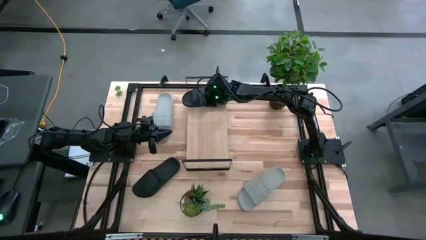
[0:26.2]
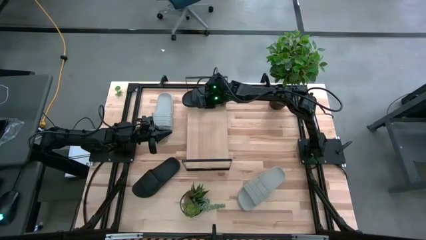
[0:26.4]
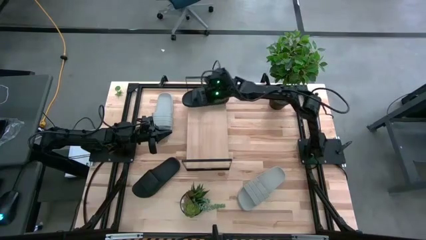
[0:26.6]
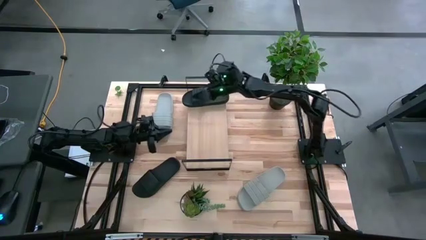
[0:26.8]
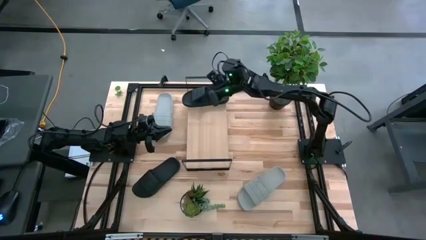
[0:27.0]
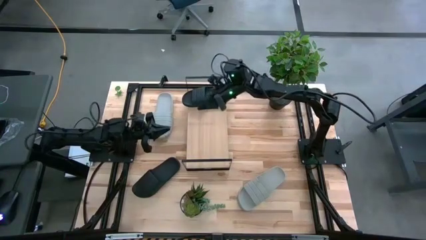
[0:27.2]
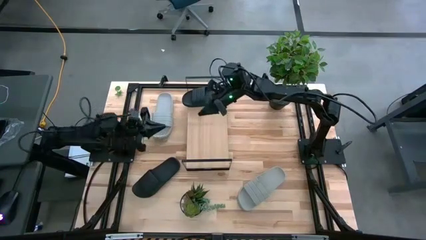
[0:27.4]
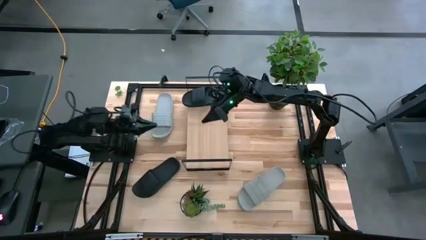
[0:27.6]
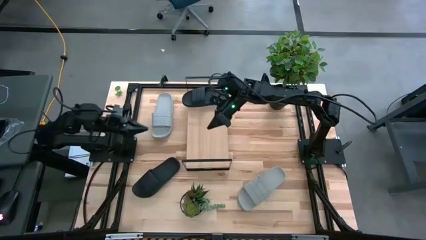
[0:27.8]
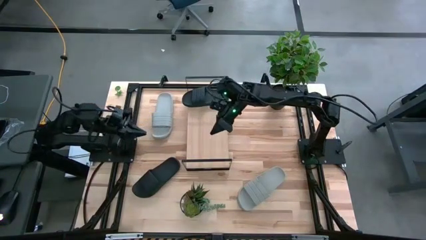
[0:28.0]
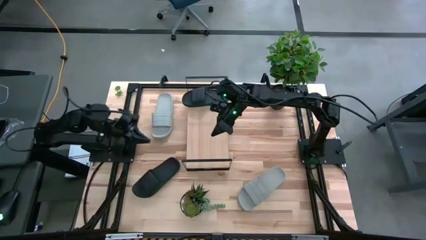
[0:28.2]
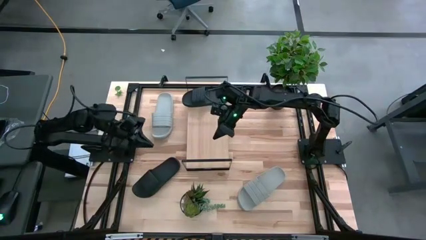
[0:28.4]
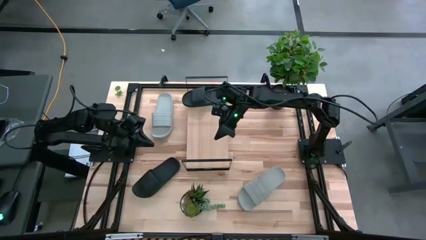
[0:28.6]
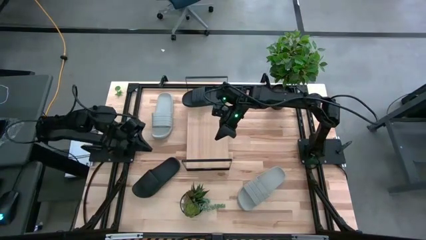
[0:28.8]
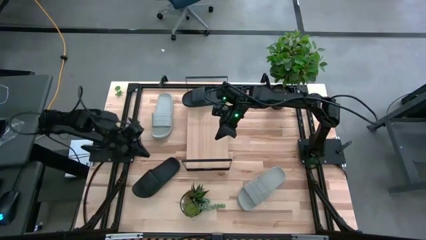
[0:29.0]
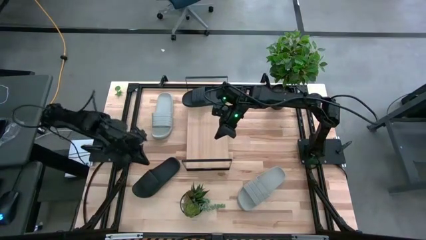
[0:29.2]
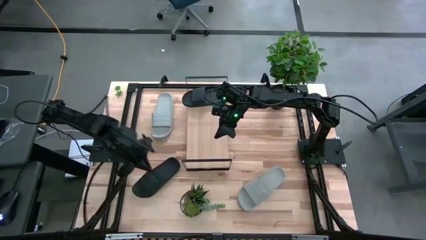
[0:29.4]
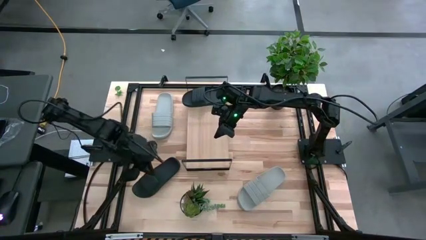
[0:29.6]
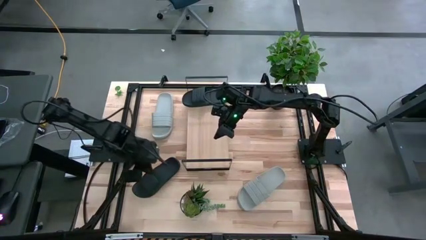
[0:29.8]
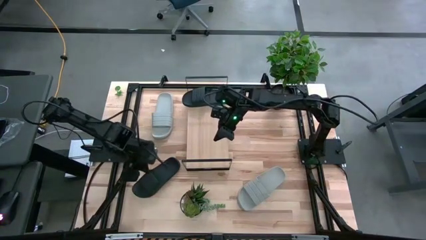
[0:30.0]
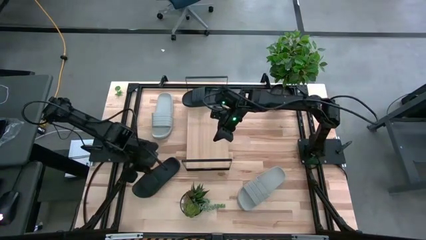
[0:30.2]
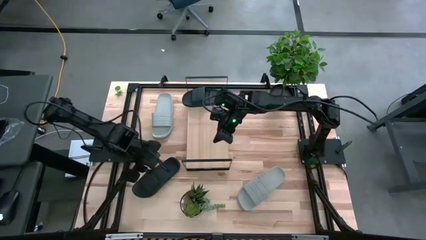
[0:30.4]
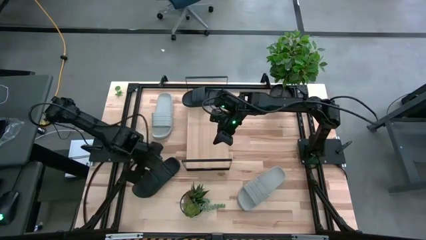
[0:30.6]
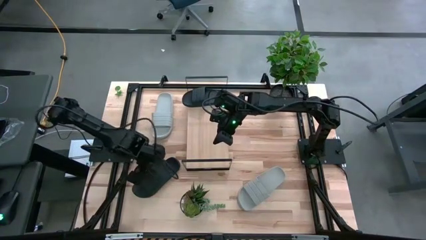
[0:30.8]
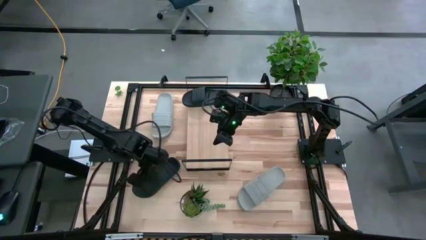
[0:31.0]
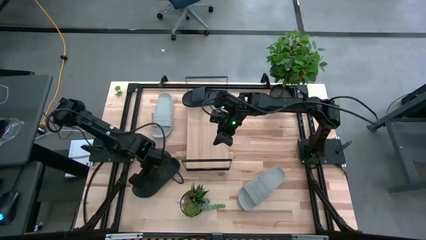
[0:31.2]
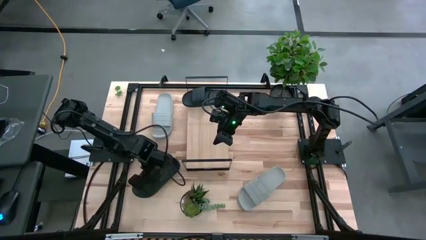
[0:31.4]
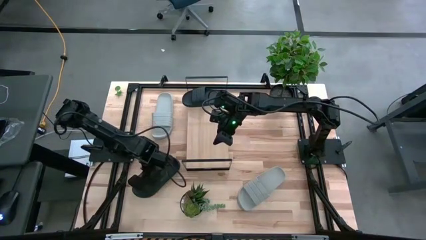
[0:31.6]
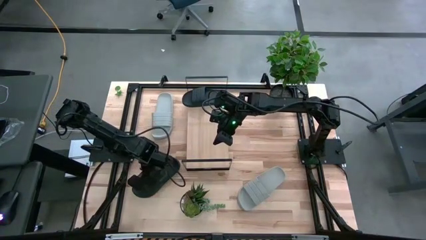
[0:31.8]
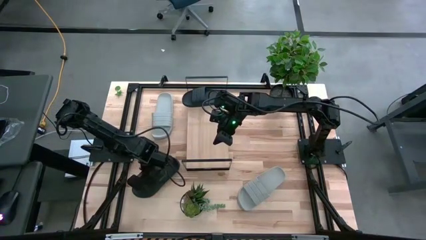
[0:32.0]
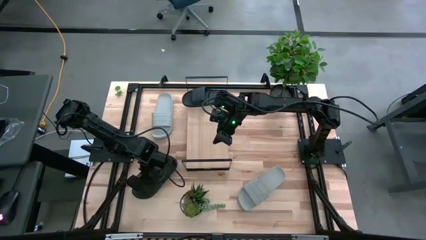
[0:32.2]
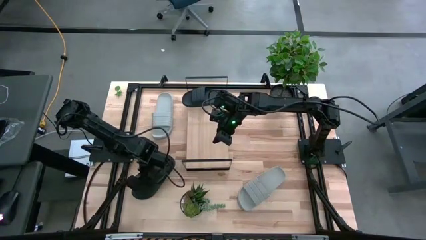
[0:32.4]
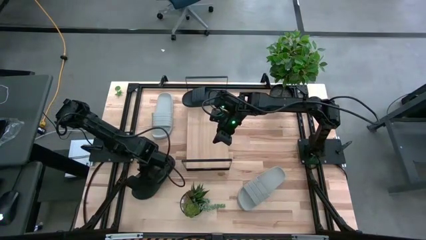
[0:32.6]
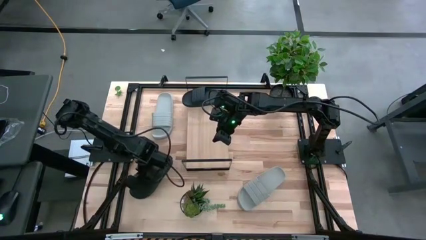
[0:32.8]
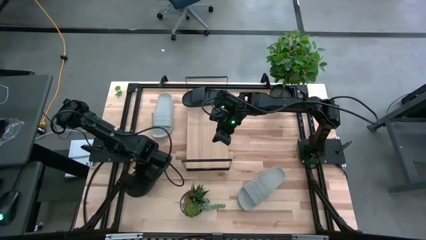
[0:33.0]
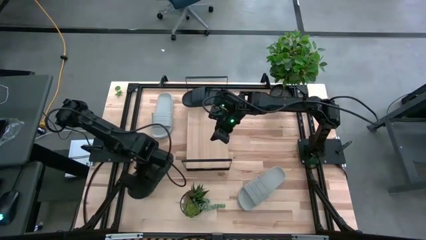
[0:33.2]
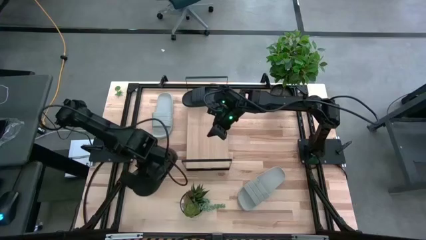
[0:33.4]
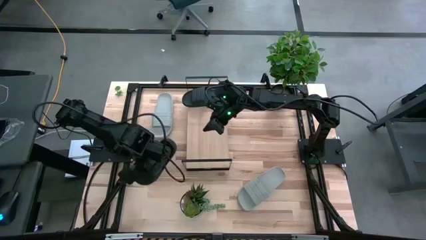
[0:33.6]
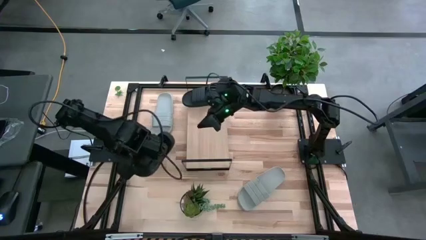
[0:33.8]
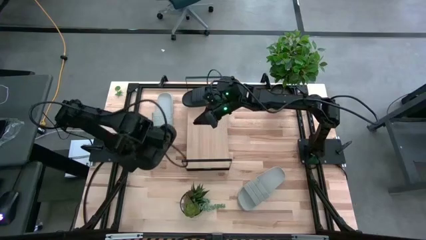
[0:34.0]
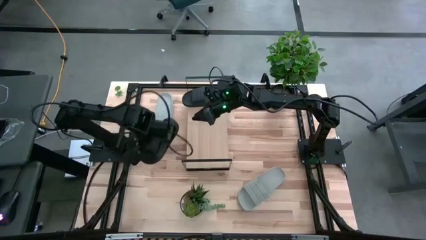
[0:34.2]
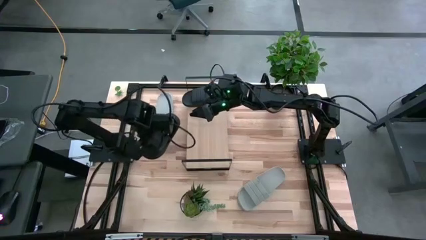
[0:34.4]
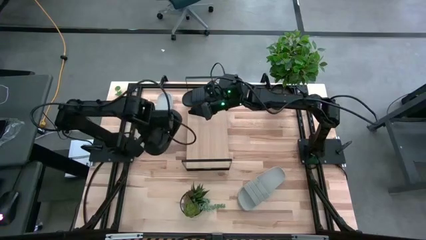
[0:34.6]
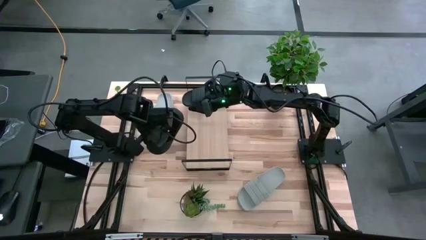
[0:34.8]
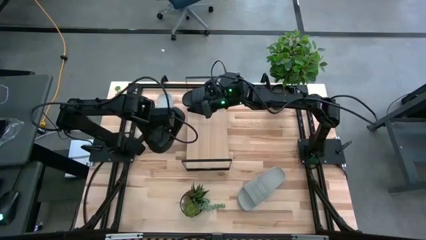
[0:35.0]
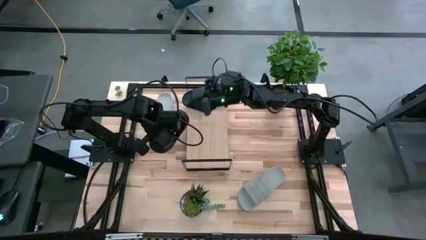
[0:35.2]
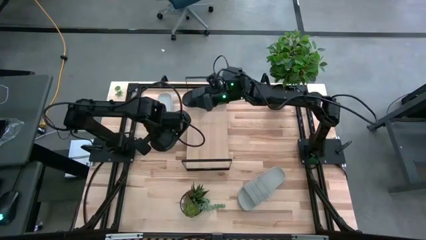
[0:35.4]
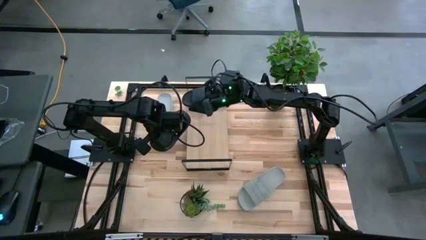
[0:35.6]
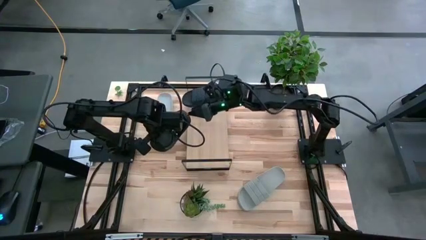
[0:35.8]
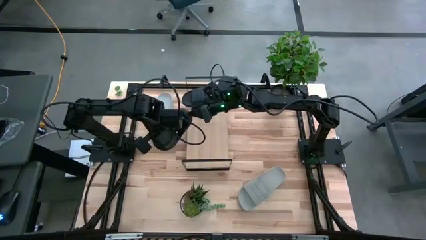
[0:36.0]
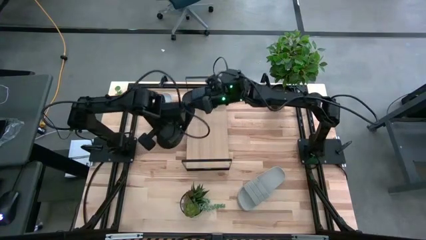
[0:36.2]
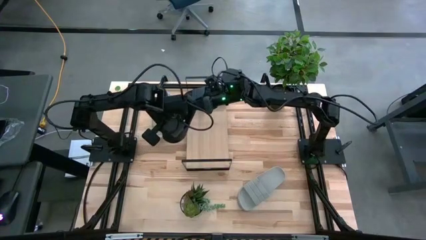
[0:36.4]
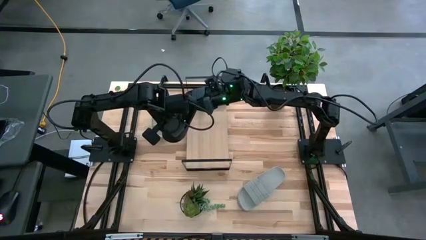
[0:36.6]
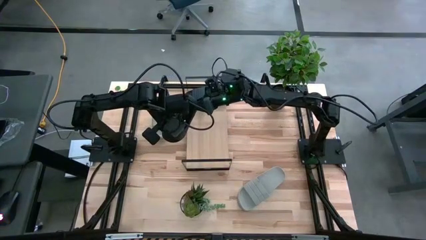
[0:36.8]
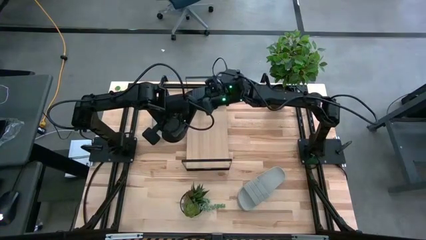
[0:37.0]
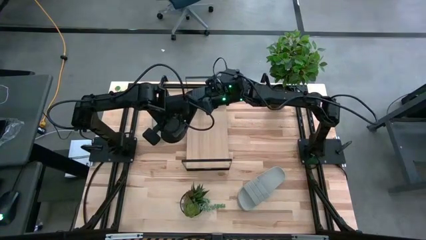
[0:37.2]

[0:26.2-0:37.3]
Task: Pick and place slides into the shelf
Put the black slipper slide on the shelf
